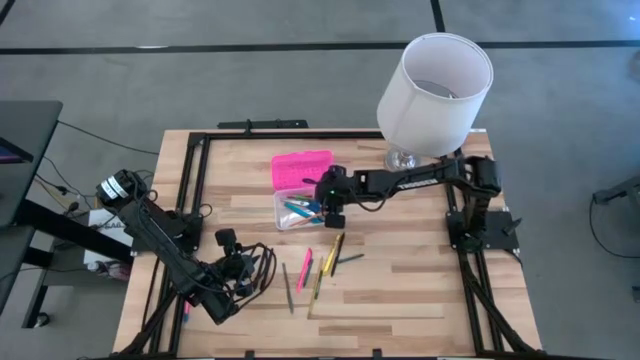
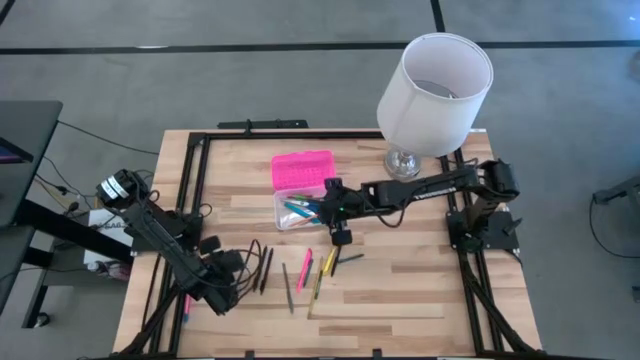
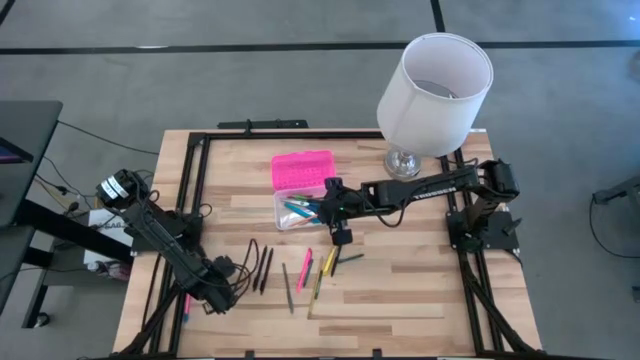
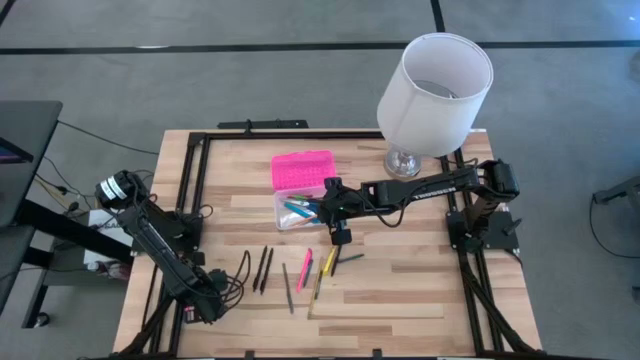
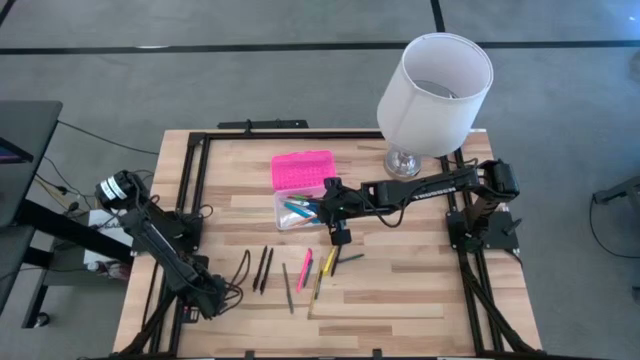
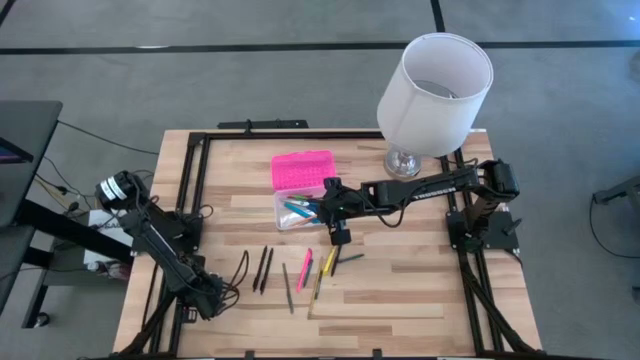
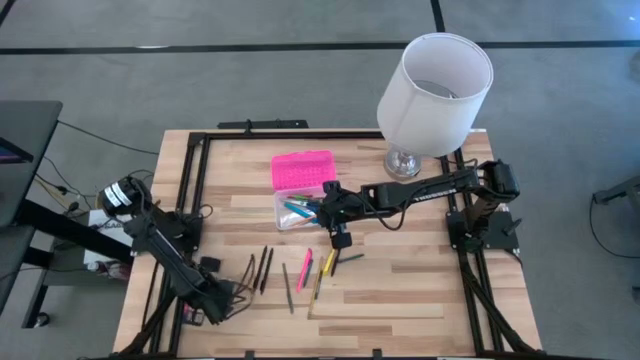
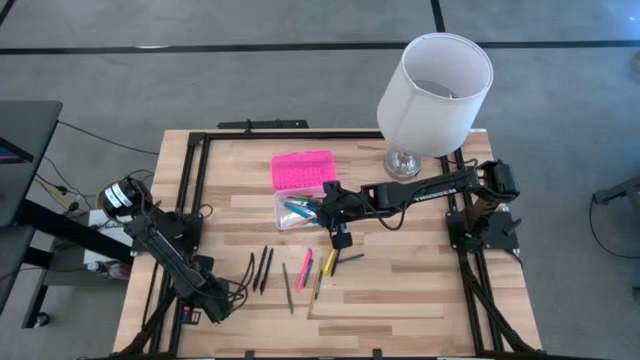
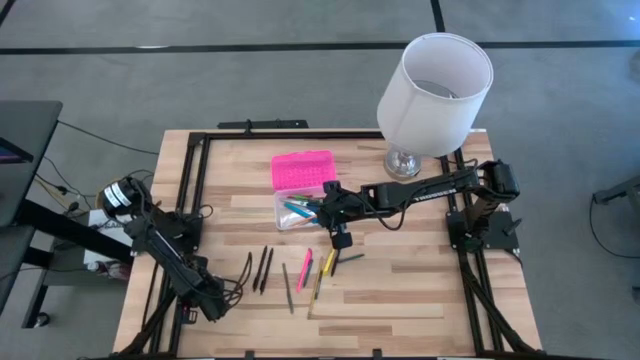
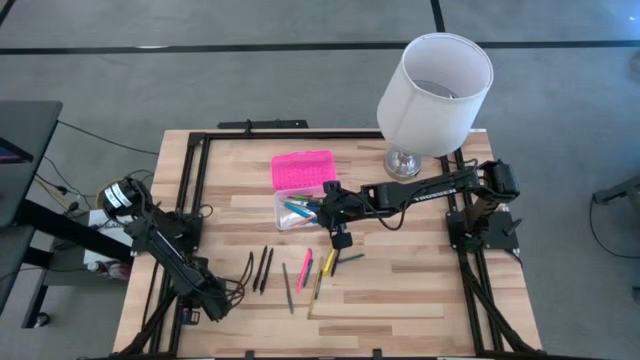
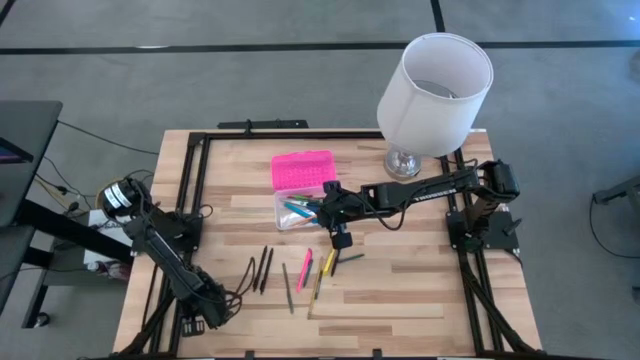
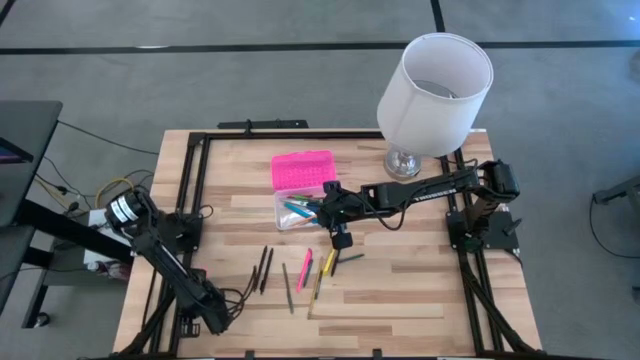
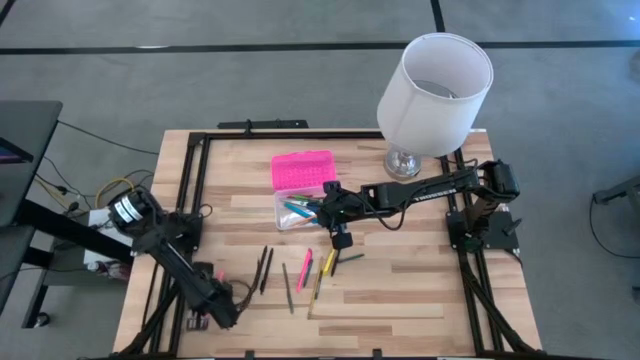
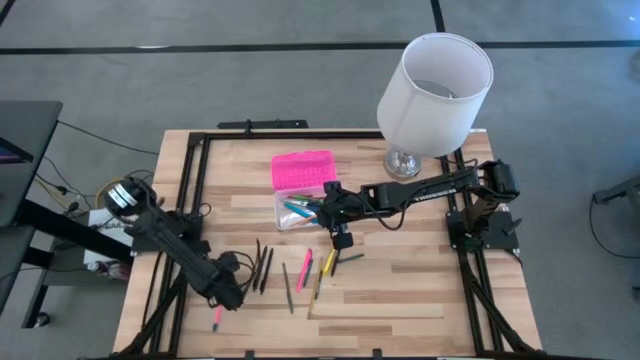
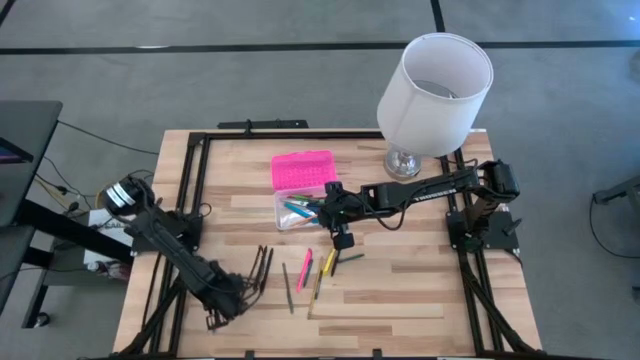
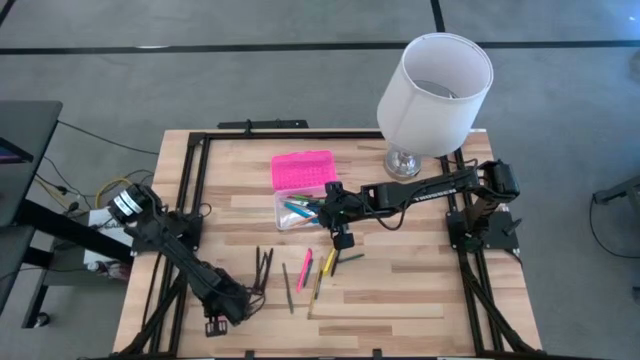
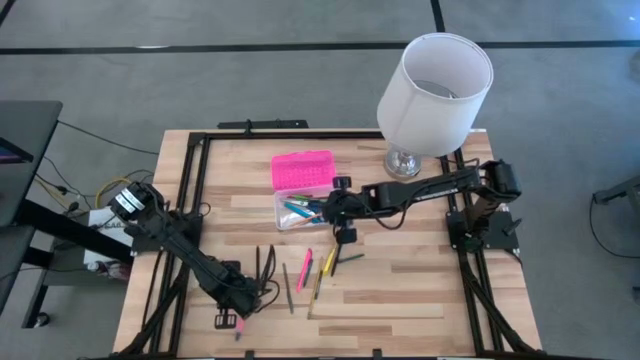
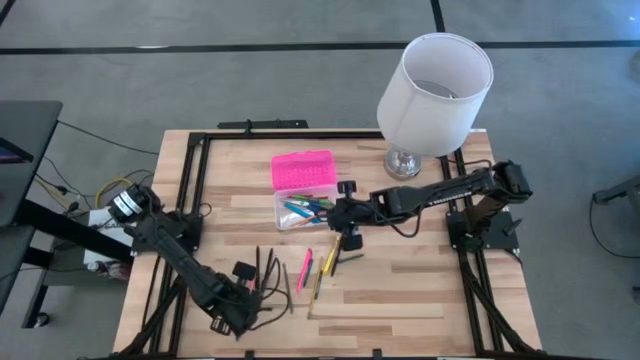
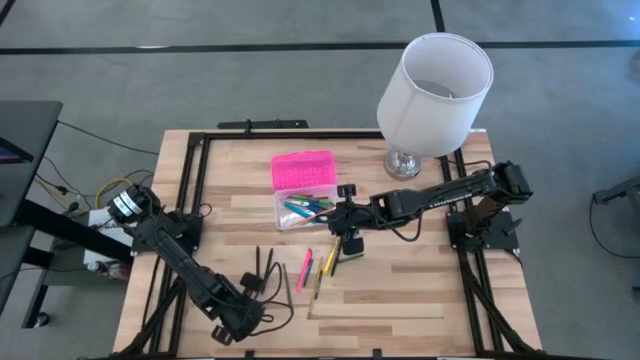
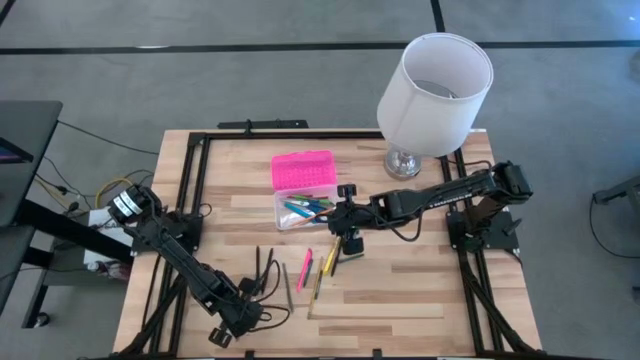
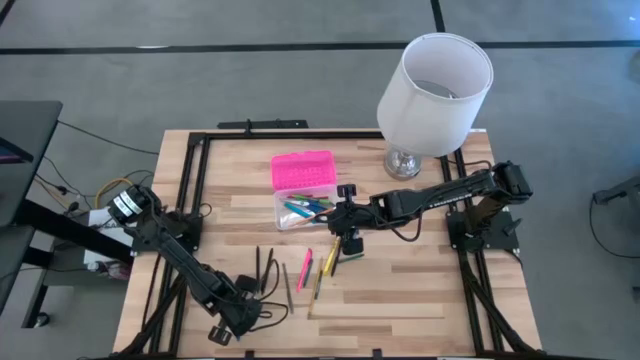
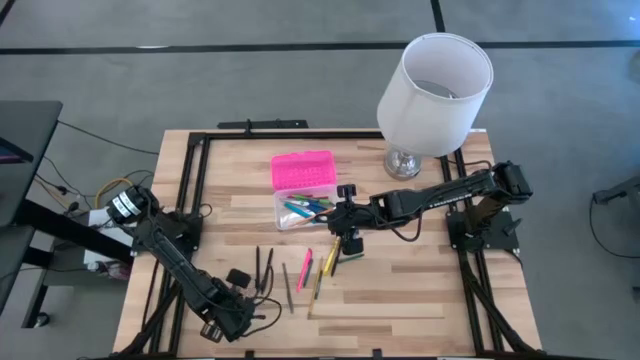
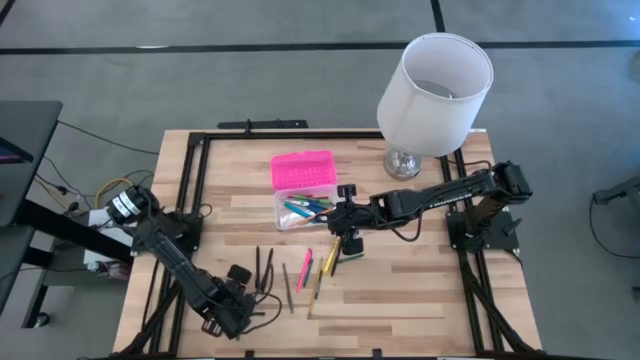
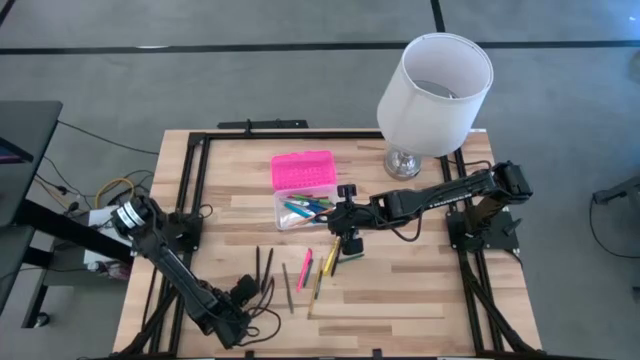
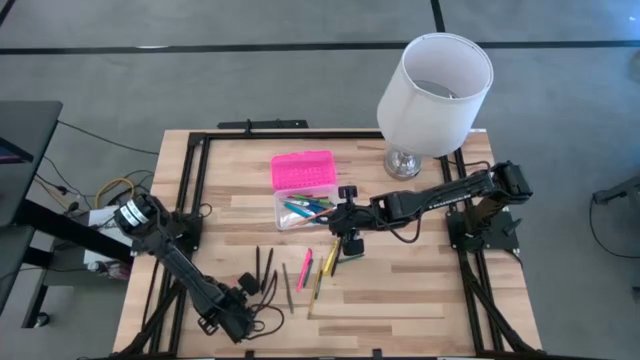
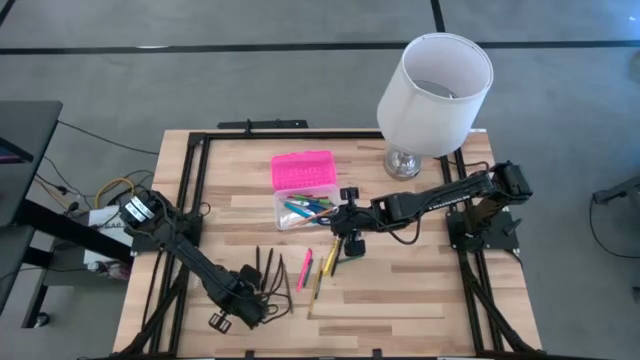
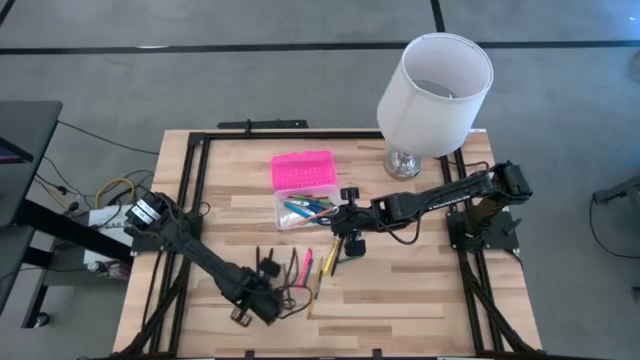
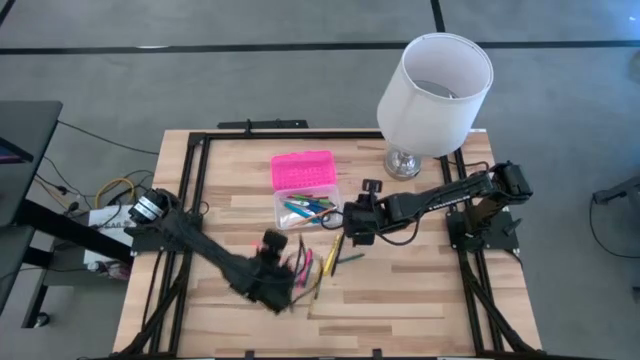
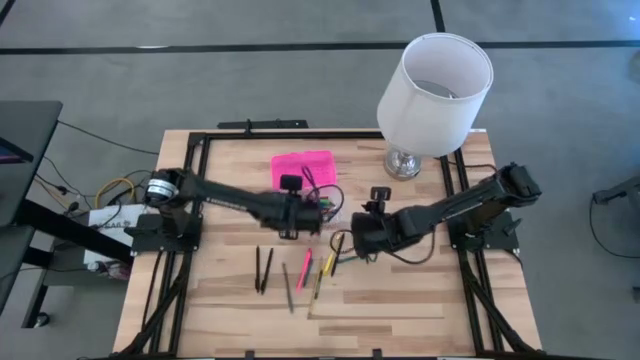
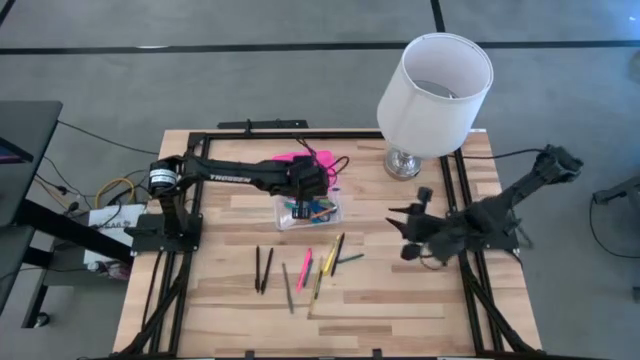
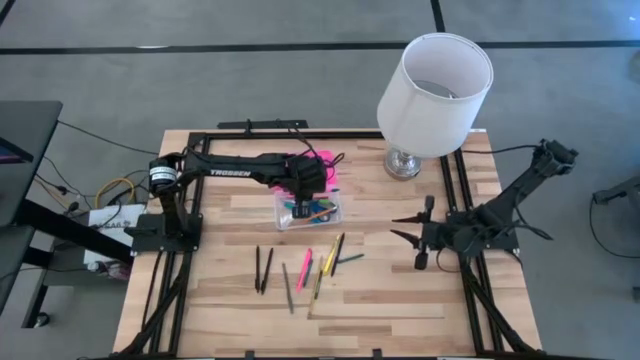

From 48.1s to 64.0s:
Task: Pick & place school supplies into a supply box
Put the pink pencil into the pink supply box

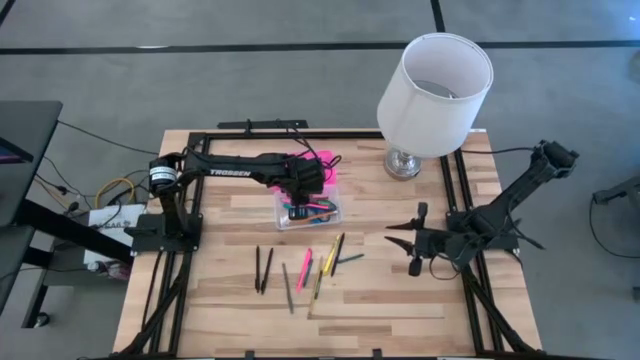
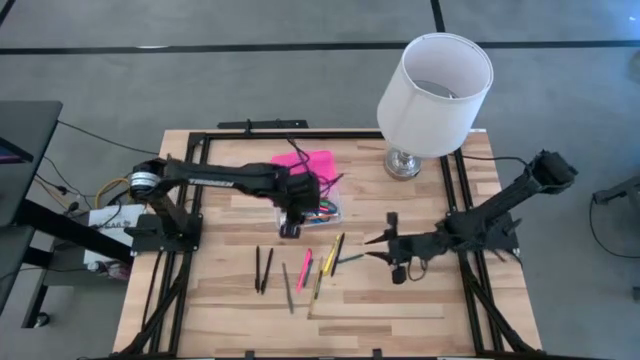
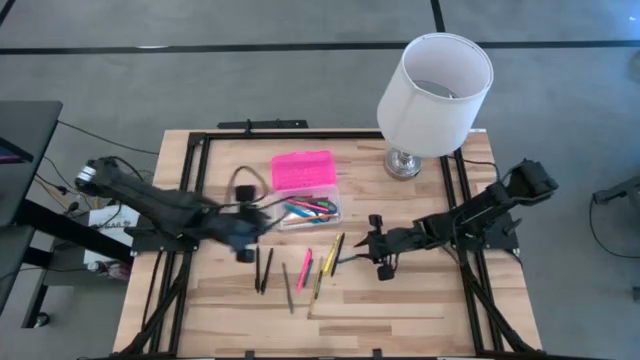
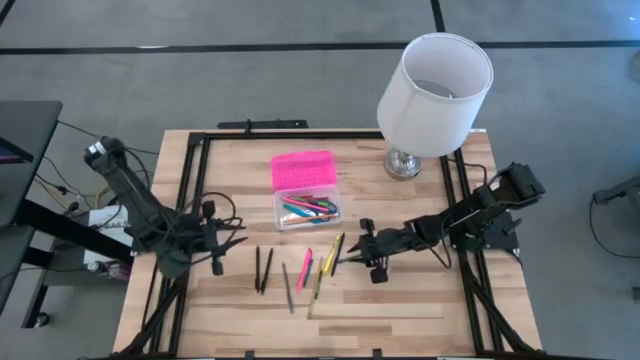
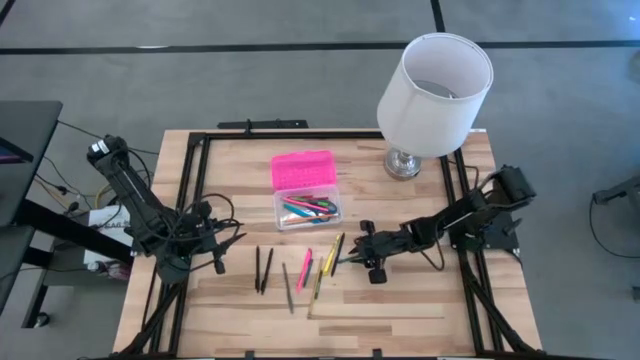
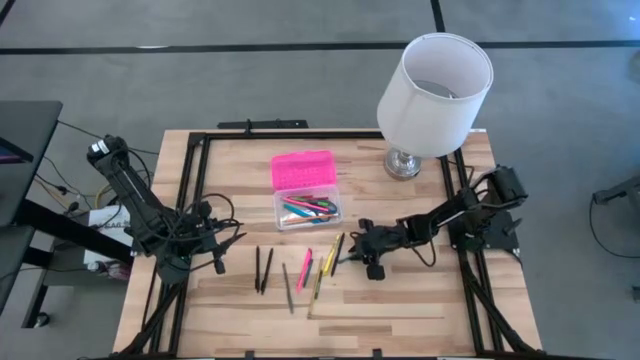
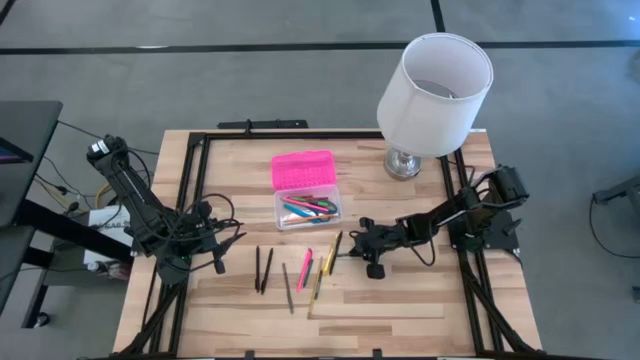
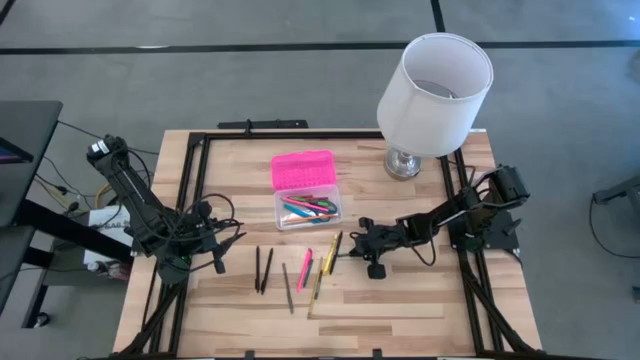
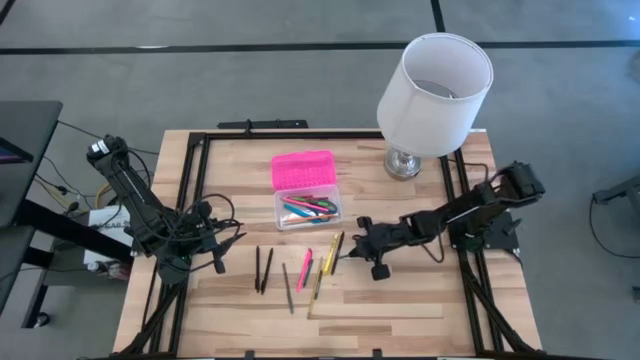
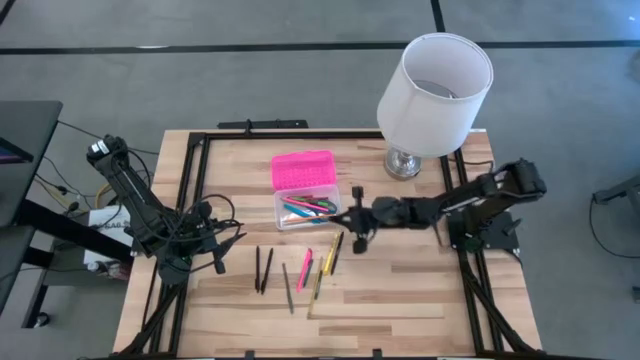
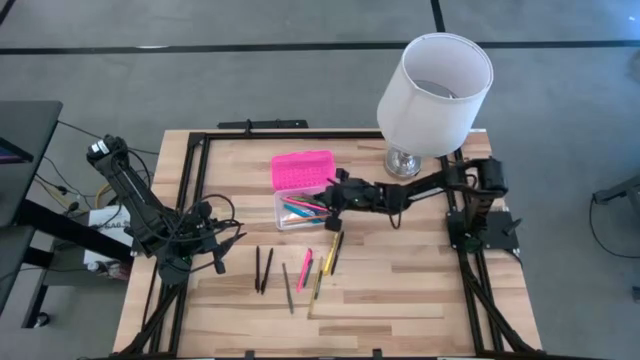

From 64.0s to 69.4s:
Put the right green crayon into the pink supply box
